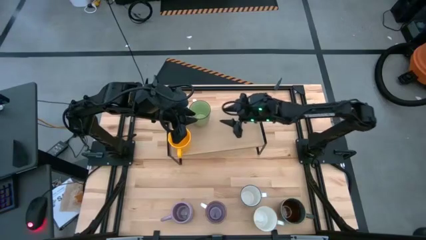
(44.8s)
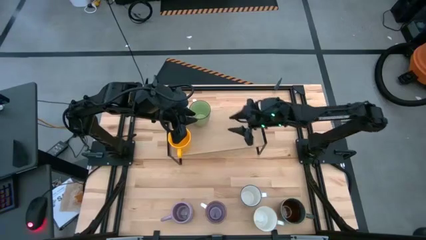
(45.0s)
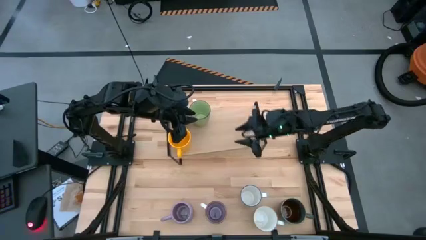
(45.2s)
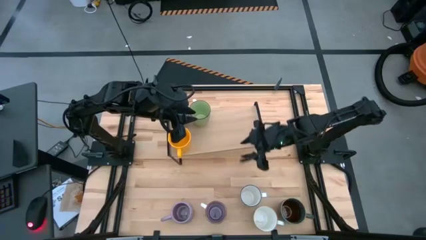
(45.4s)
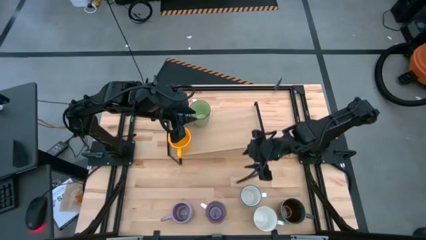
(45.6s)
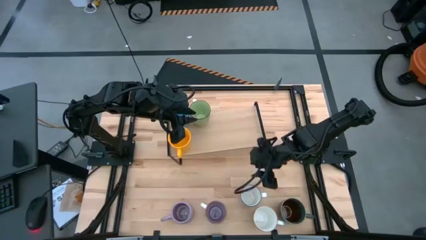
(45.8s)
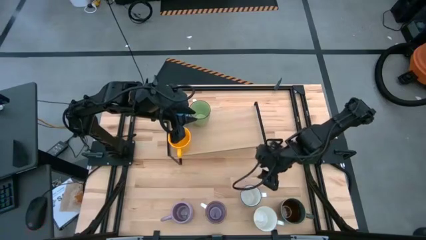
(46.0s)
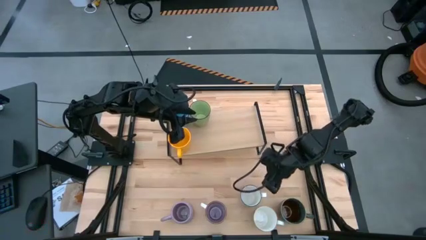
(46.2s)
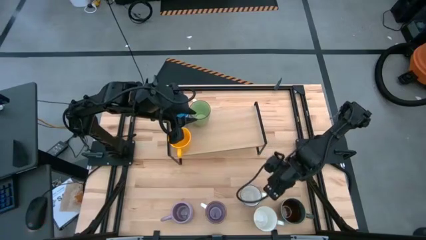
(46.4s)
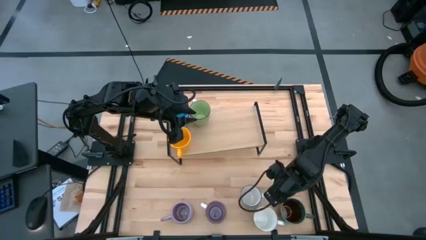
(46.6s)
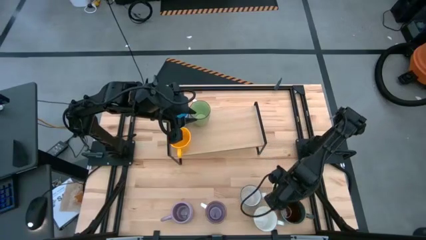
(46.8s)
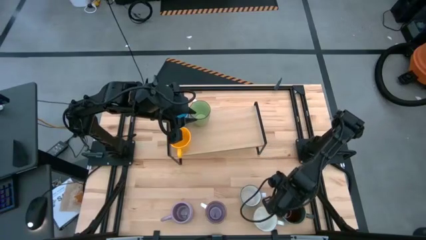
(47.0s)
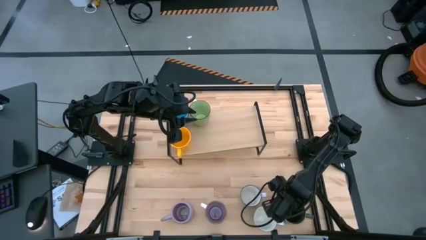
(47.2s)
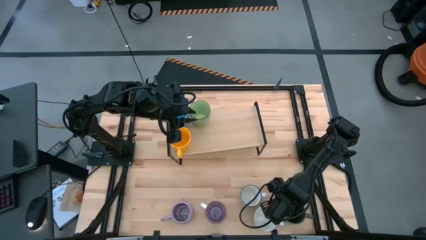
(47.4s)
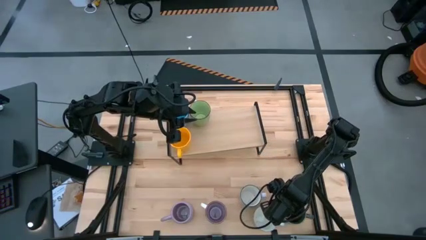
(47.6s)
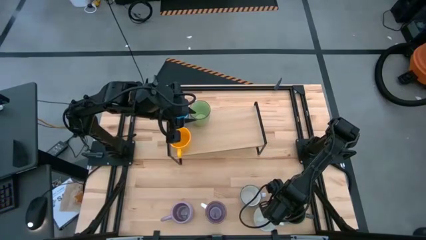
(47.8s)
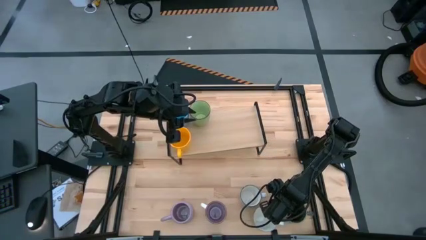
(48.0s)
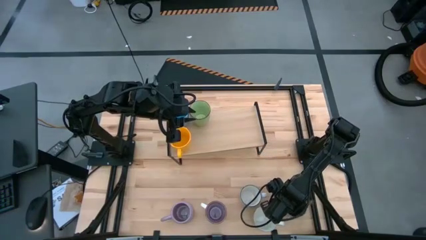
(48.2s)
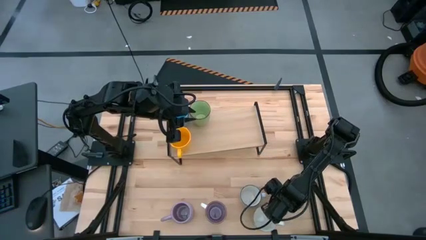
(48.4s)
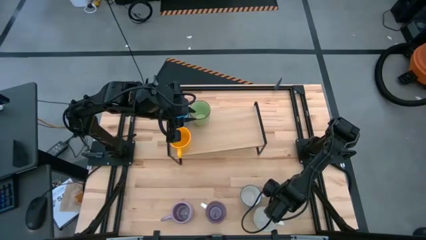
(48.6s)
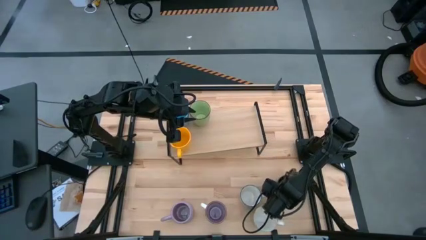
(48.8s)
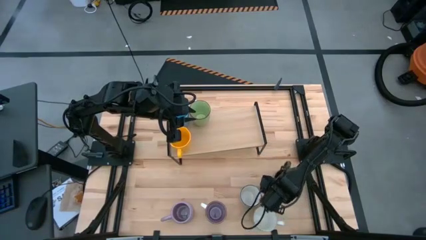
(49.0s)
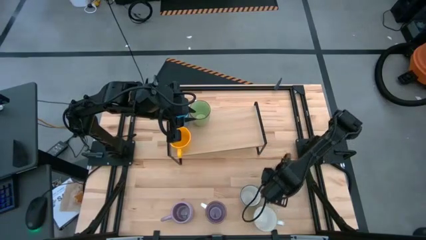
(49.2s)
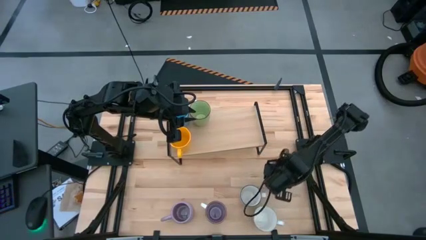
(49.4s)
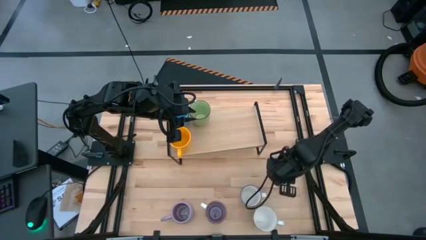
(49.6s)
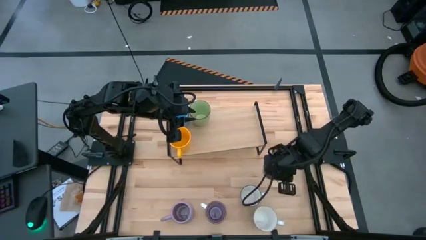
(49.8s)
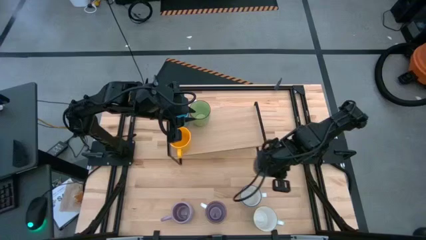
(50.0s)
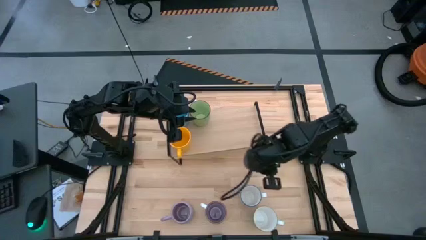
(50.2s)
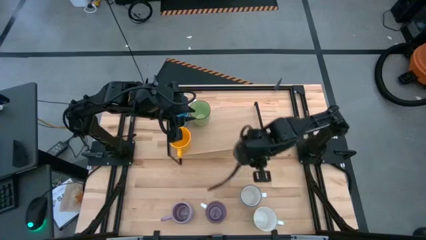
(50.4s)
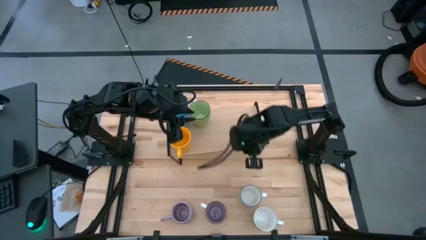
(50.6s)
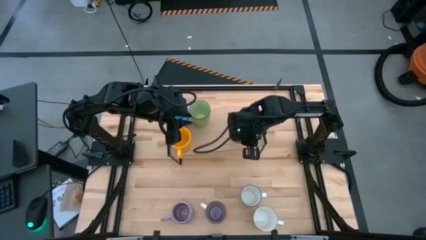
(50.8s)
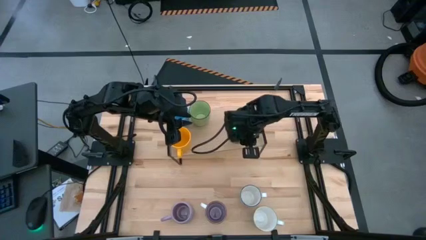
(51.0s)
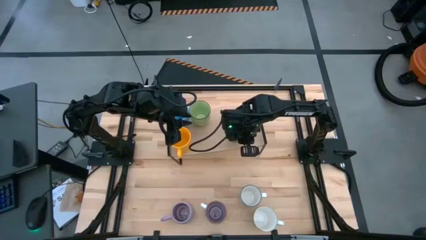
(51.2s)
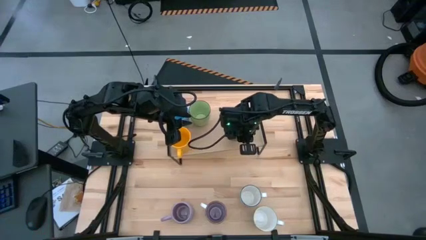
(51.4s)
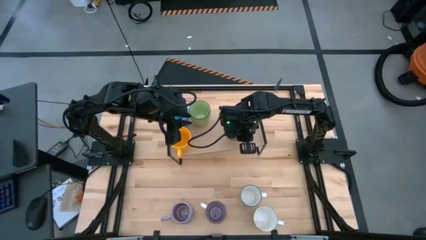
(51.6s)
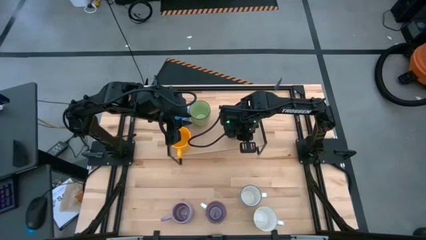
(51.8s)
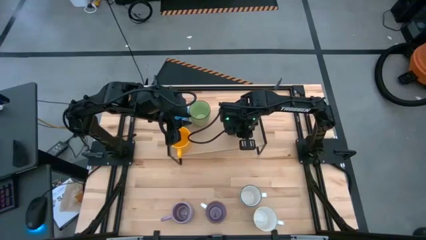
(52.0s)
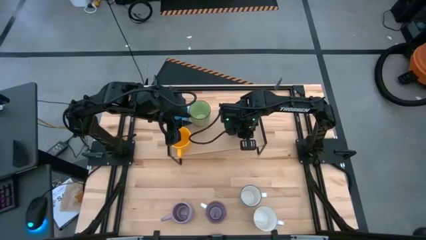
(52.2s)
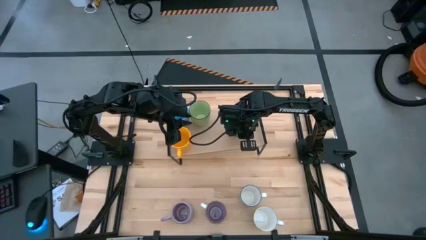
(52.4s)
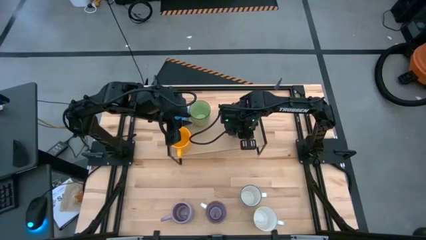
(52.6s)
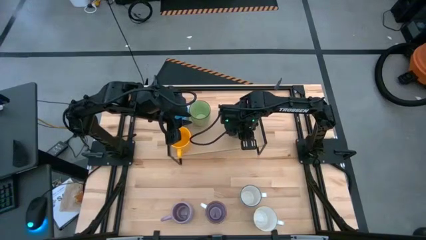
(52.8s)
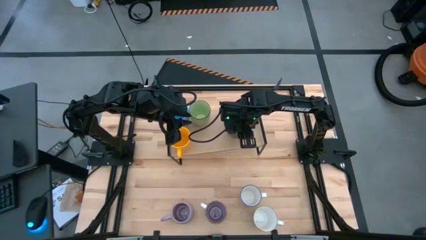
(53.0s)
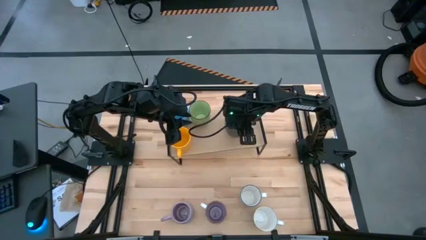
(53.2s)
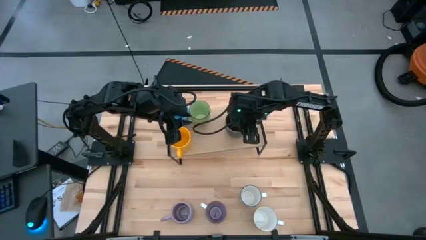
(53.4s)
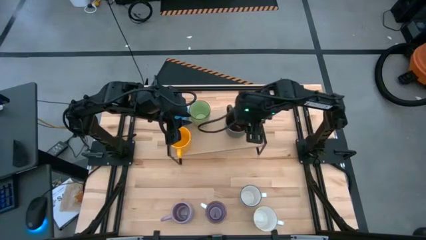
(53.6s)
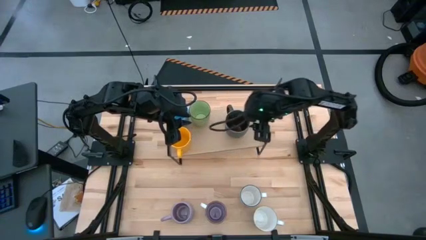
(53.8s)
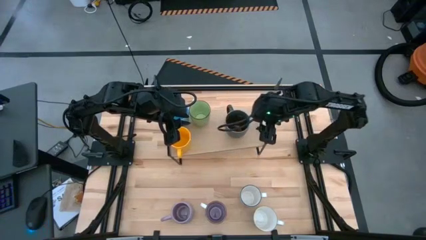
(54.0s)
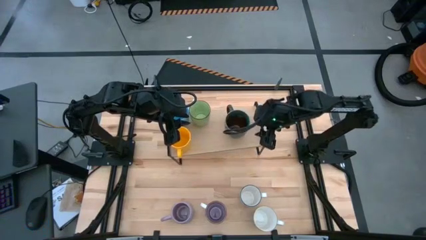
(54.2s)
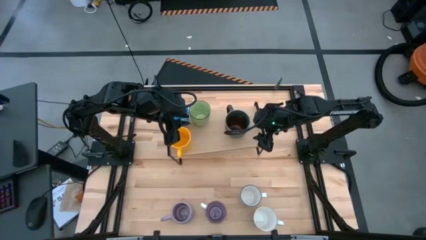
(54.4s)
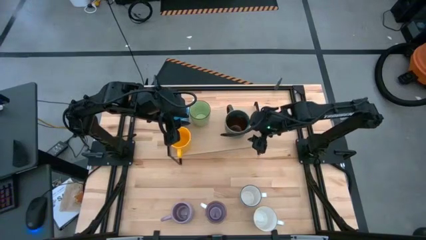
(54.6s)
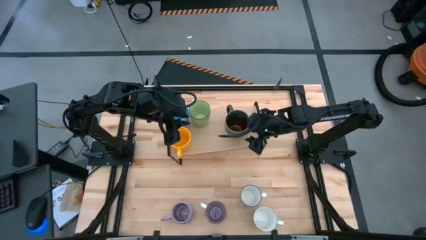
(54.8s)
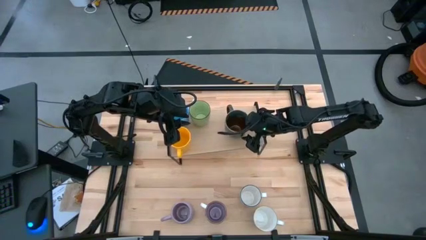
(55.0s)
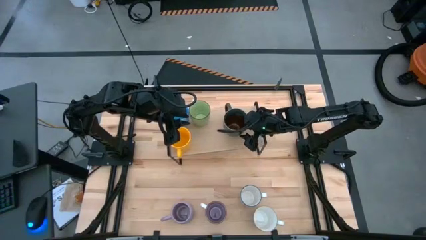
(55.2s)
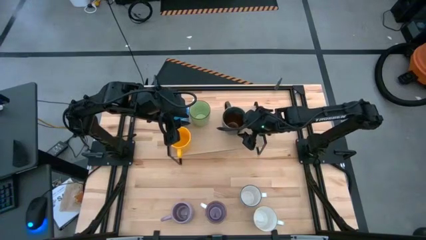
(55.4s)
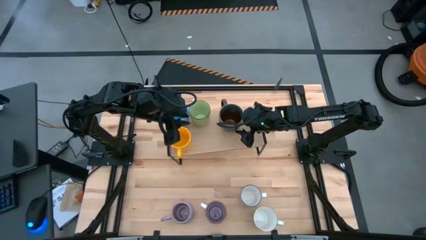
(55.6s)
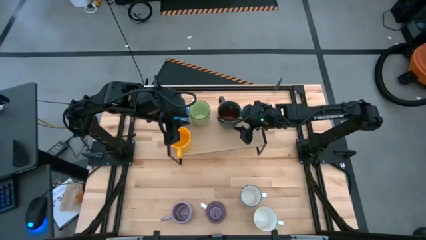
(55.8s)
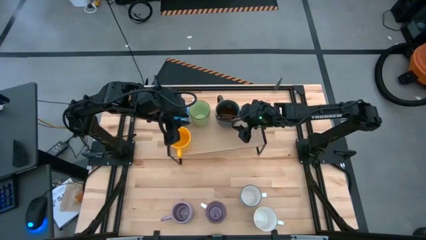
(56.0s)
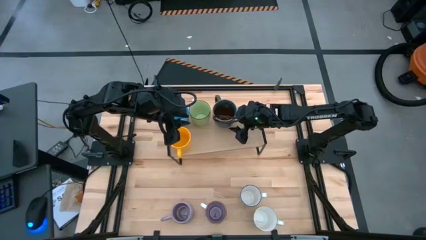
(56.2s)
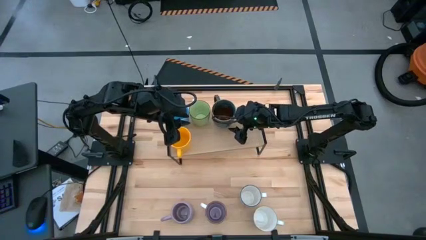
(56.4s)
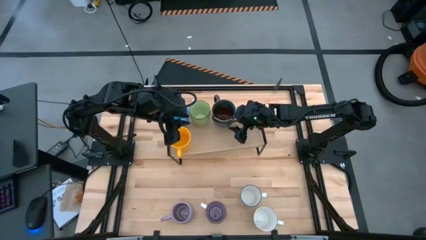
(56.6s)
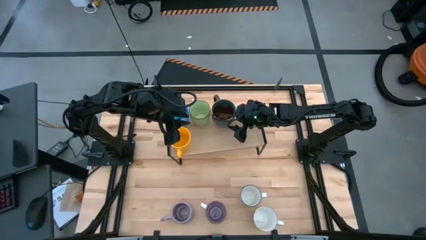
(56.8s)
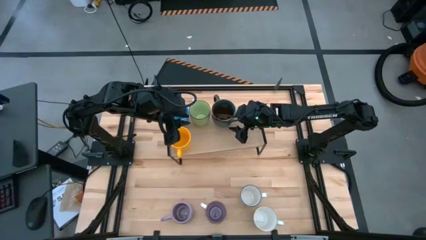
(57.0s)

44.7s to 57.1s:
Task: Place coffee mugs
Put the blue patterned mug on the shelf
